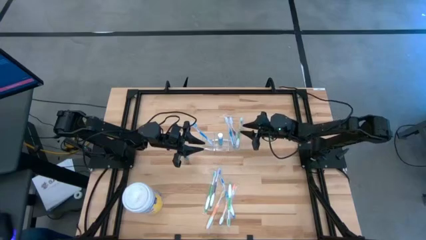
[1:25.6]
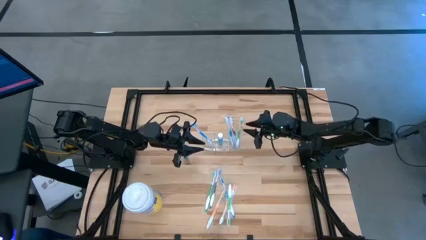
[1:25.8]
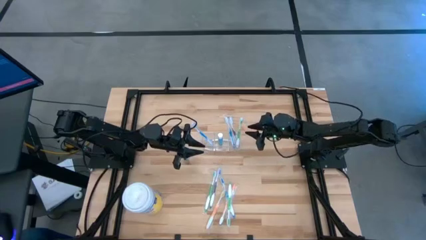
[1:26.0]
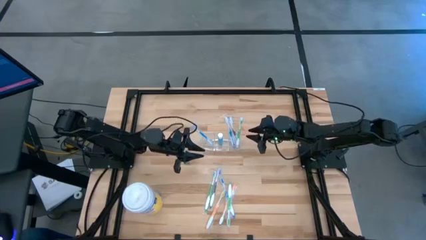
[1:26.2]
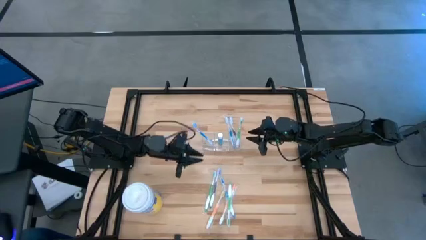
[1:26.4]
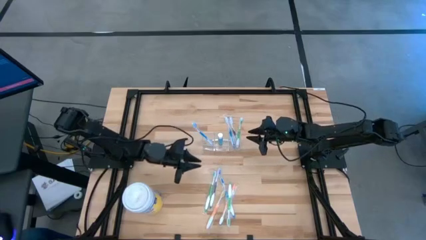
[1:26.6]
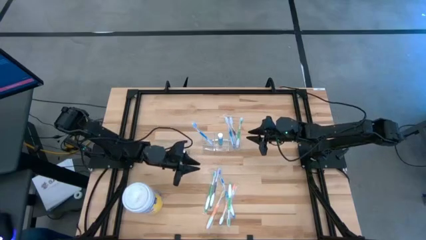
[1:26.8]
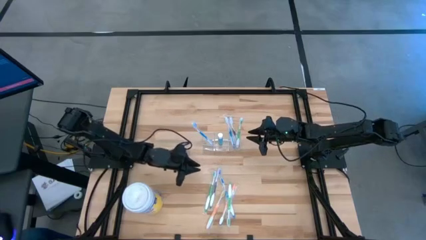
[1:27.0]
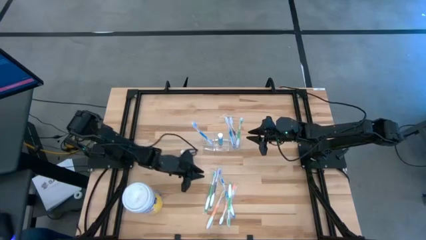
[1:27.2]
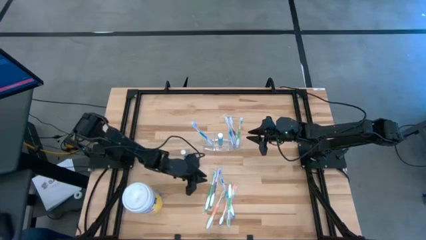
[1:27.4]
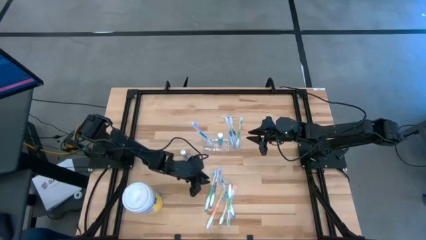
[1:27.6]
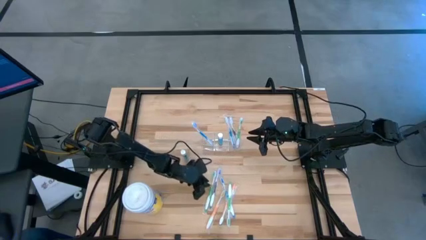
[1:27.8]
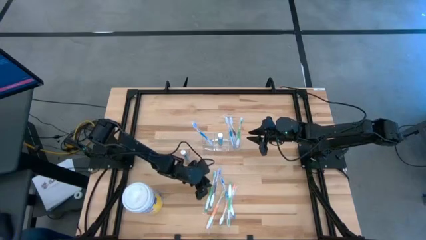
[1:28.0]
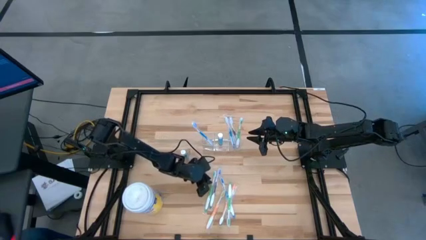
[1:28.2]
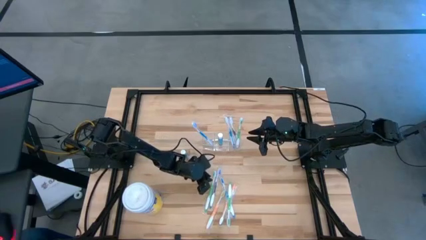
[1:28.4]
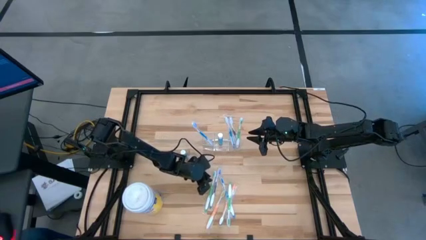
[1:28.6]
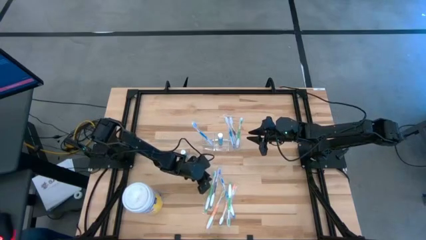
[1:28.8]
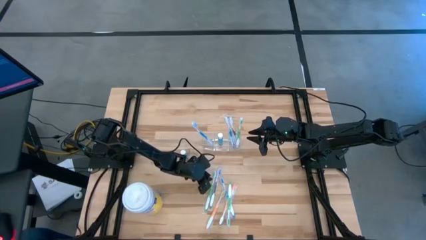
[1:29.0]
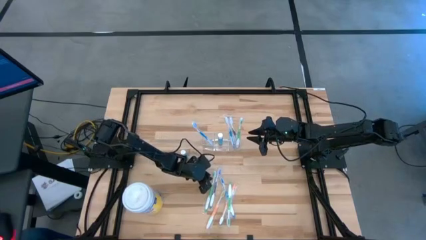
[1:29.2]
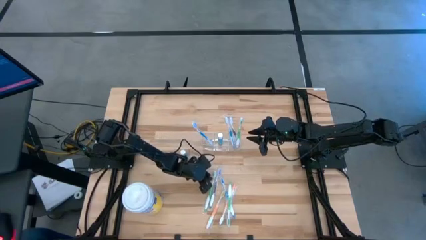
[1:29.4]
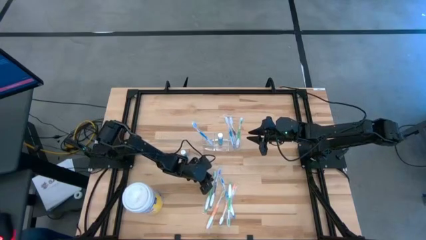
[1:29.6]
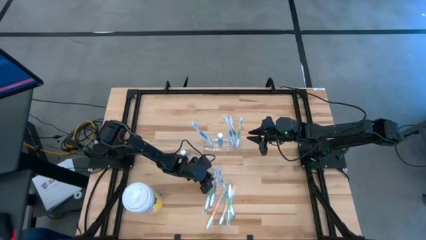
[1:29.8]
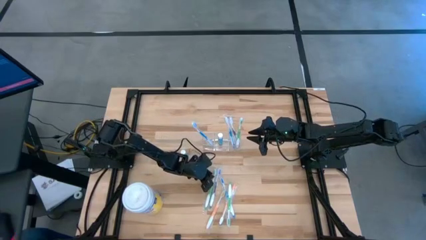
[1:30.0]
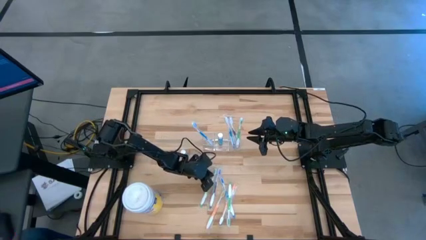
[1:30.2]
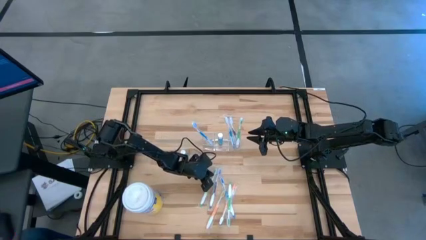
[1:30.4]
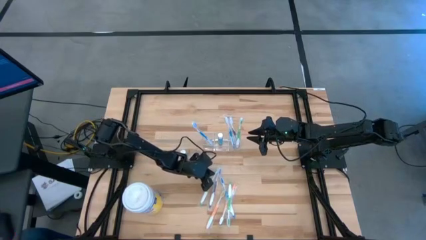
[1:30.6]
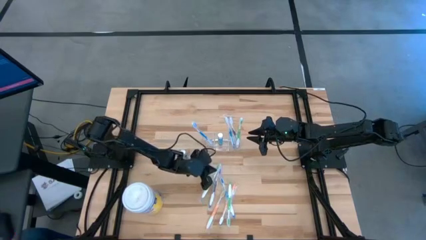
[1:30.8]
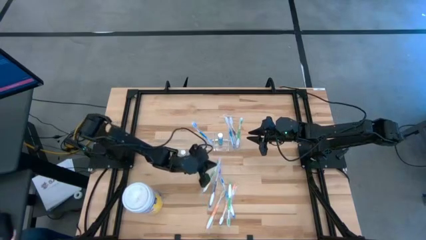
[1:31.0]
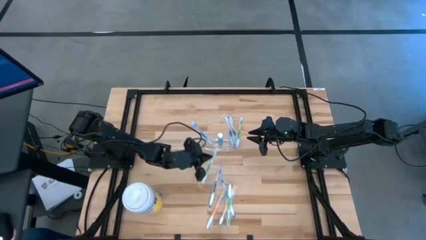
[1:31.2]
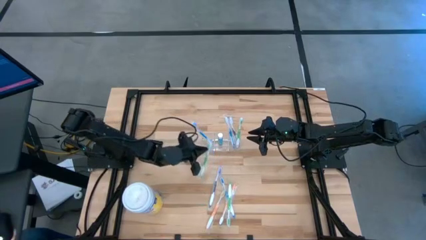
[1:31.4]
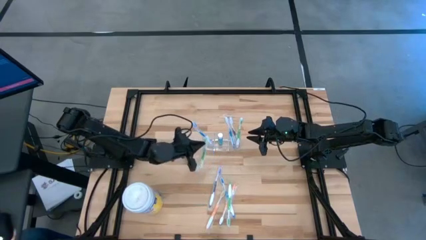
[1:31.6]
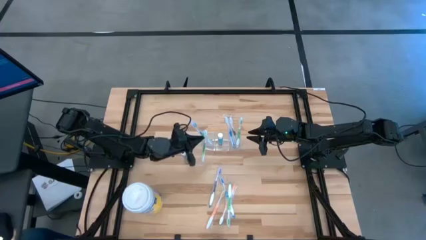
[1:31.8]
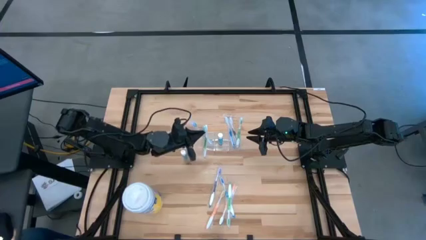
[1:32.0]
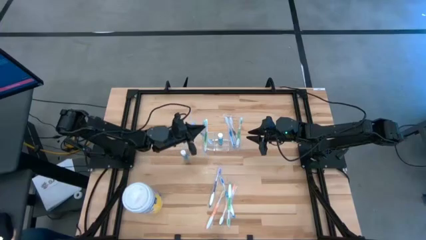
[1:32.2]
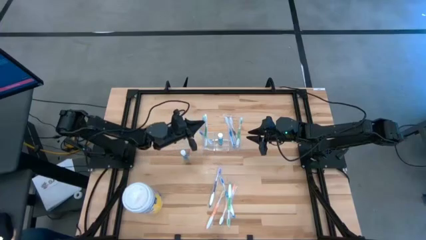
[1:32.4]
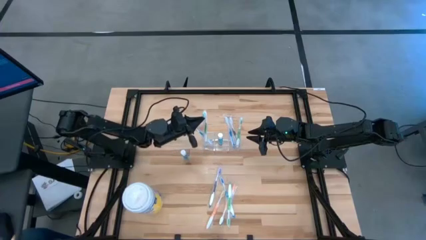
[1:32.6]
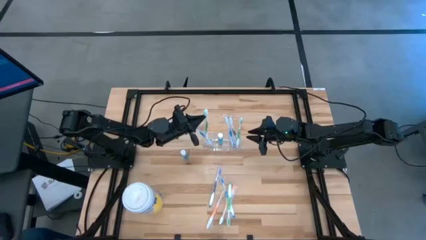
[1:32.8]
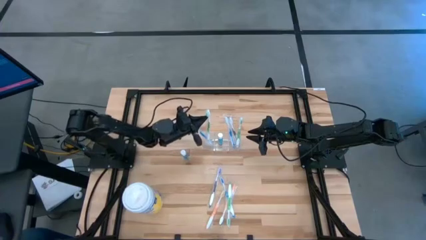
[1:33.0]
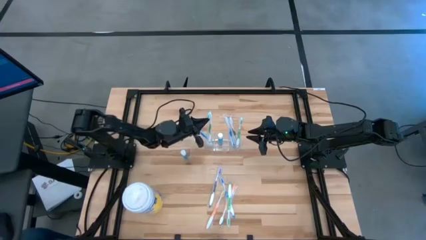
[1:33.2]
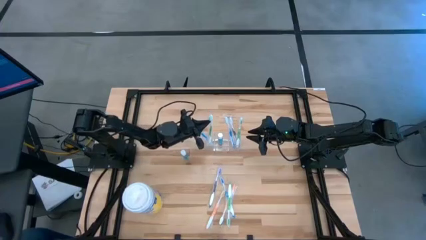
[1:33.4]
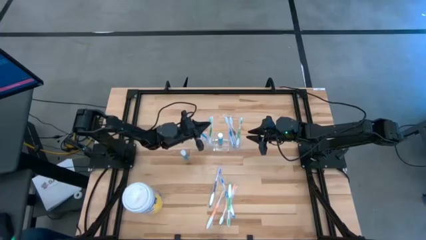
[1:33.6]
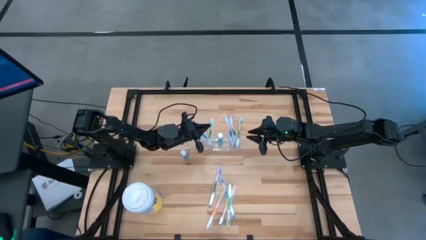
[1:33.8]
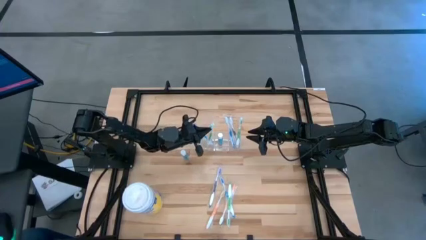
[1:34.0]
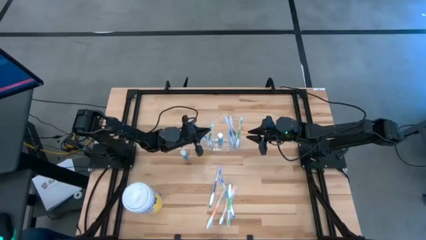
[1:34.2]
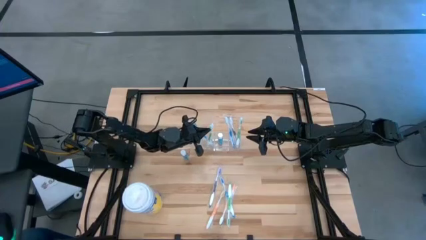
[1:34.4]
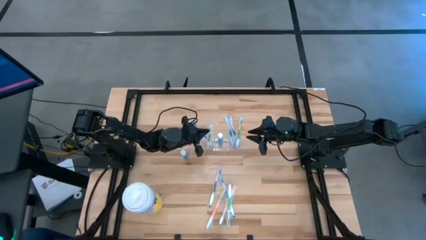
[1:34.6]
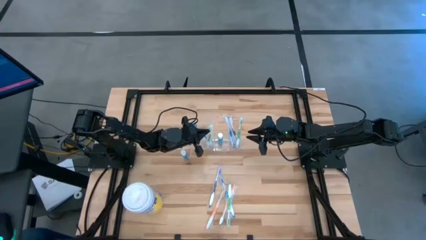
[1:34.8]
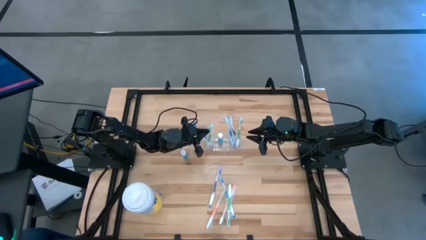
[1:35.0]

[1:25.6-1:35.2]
Task: Pick & Place toothbrushing station
Put the green toothbrush into the transparent organizer

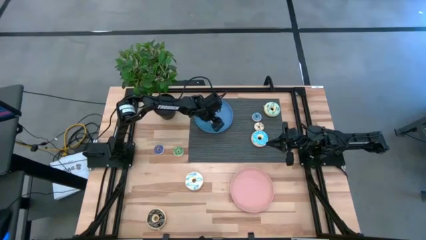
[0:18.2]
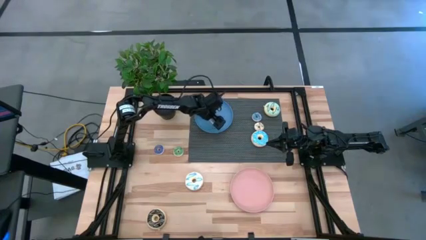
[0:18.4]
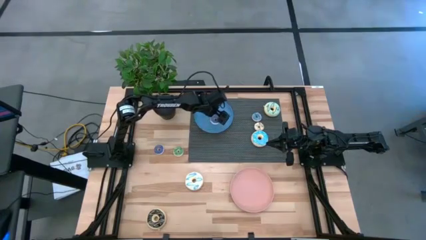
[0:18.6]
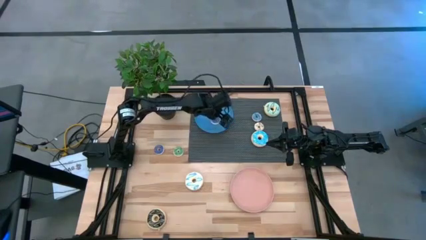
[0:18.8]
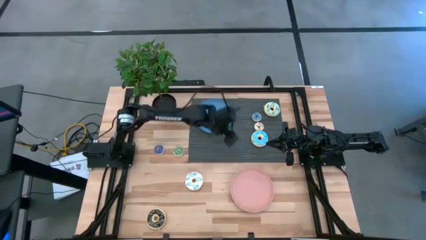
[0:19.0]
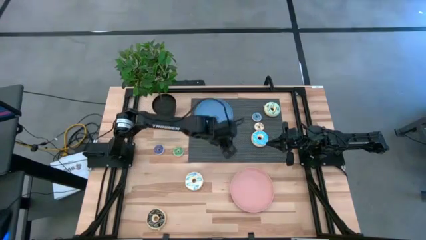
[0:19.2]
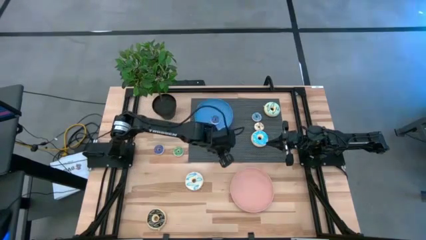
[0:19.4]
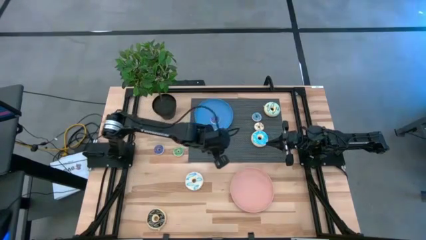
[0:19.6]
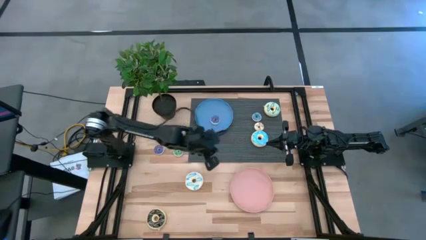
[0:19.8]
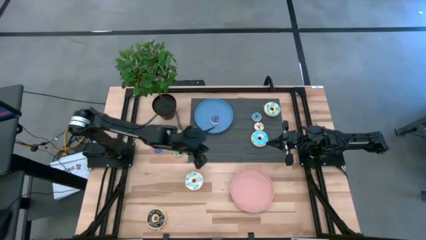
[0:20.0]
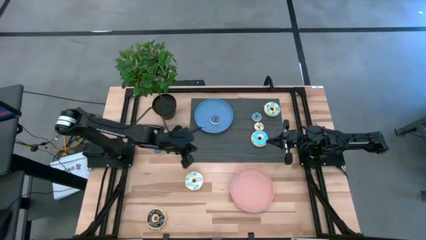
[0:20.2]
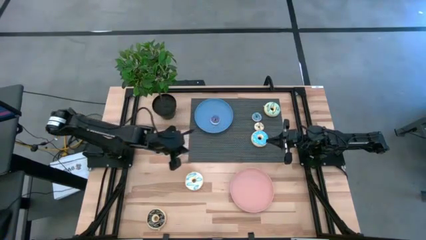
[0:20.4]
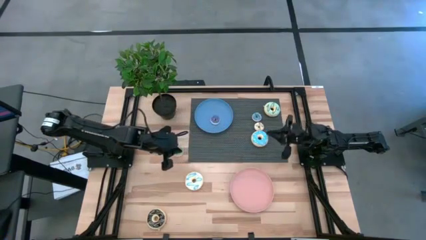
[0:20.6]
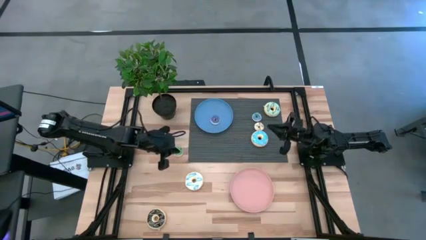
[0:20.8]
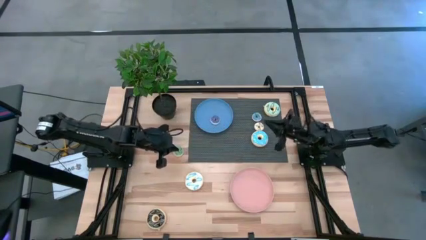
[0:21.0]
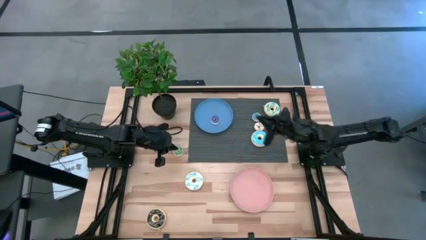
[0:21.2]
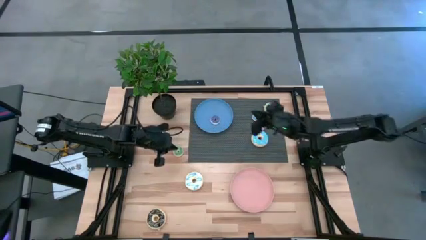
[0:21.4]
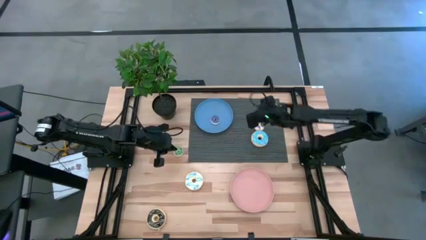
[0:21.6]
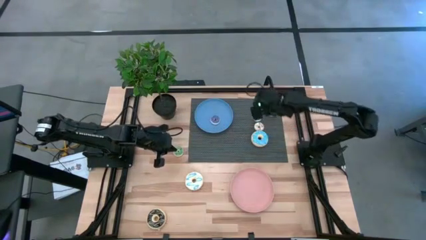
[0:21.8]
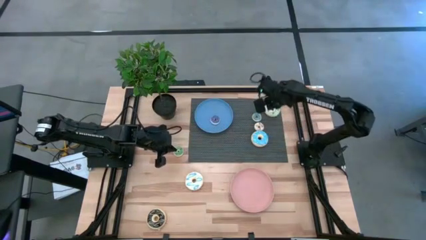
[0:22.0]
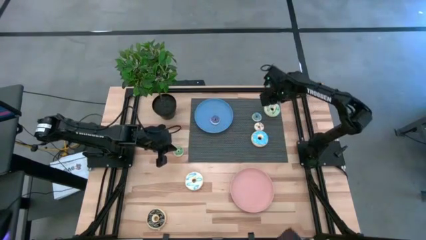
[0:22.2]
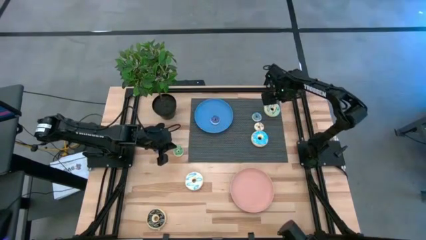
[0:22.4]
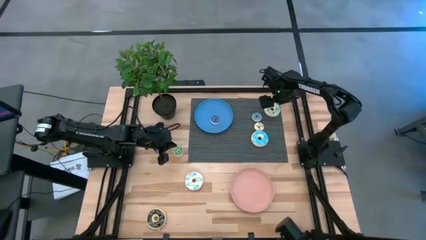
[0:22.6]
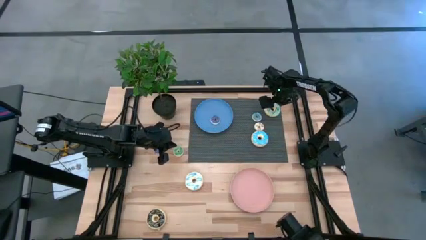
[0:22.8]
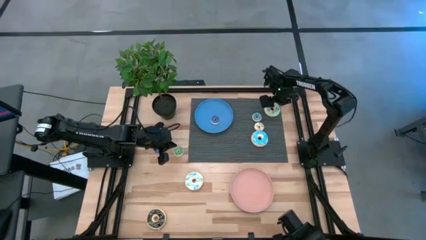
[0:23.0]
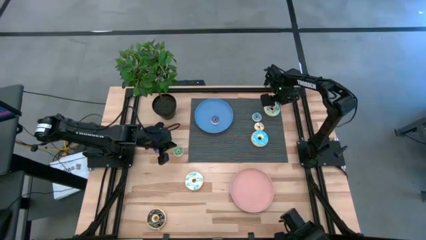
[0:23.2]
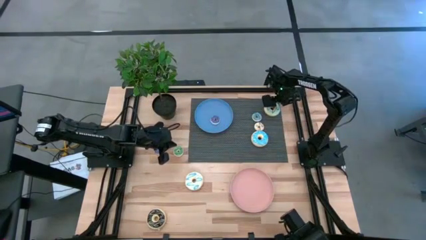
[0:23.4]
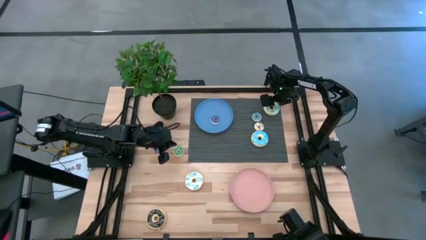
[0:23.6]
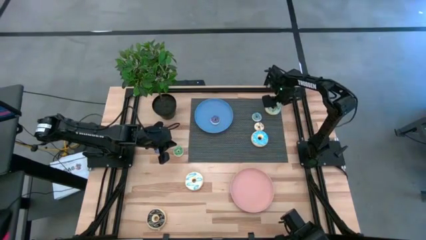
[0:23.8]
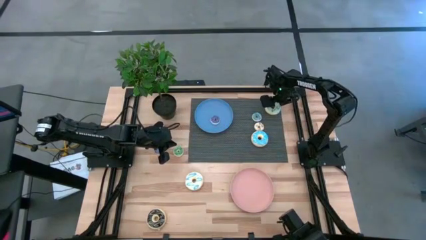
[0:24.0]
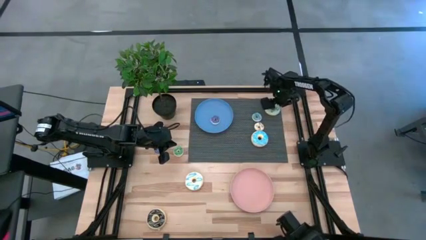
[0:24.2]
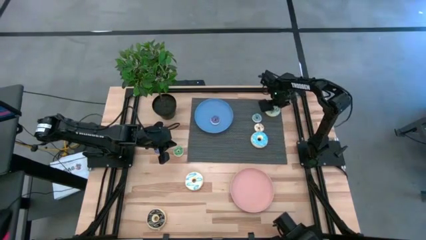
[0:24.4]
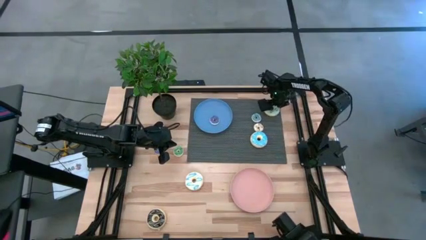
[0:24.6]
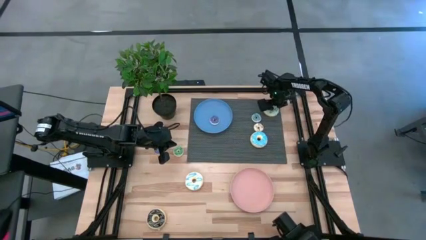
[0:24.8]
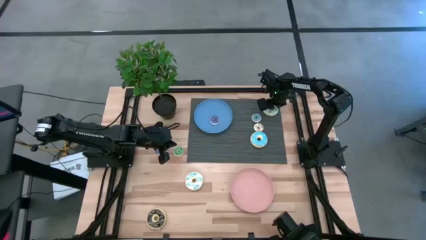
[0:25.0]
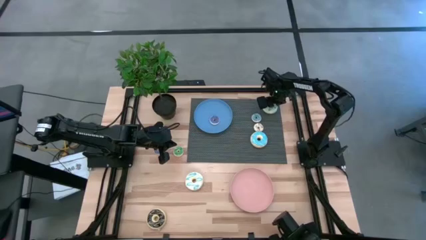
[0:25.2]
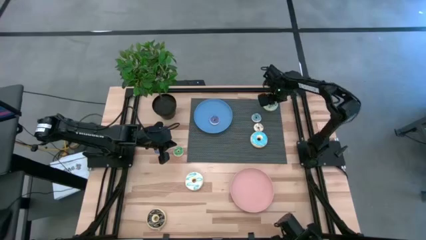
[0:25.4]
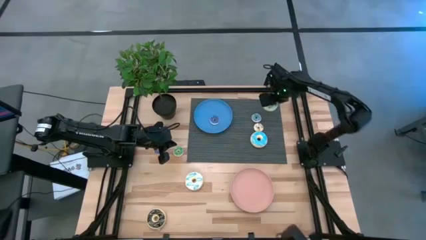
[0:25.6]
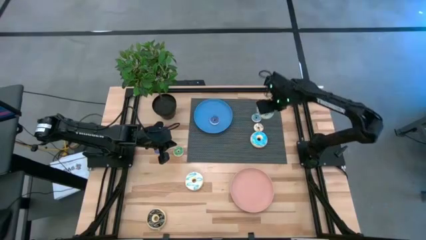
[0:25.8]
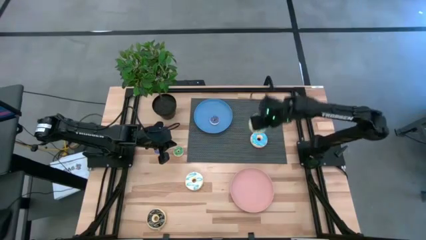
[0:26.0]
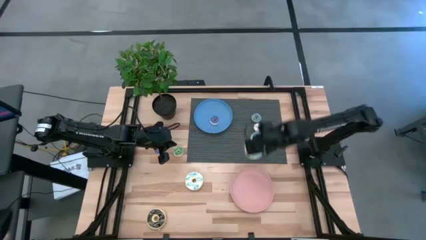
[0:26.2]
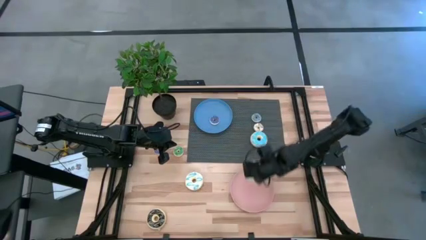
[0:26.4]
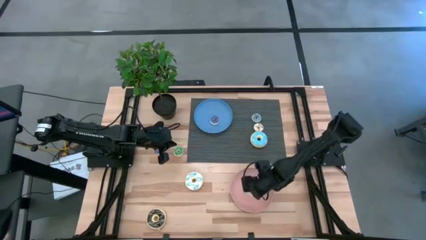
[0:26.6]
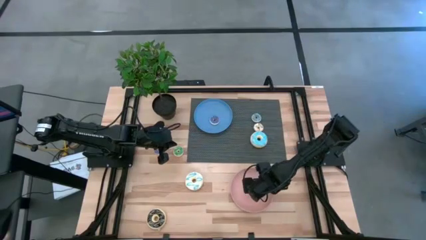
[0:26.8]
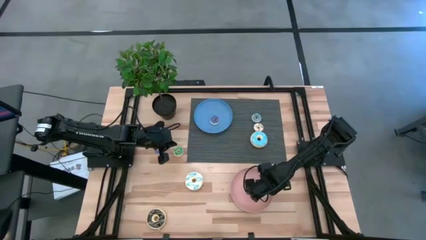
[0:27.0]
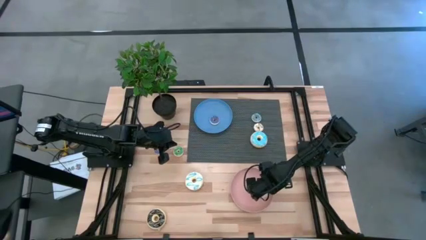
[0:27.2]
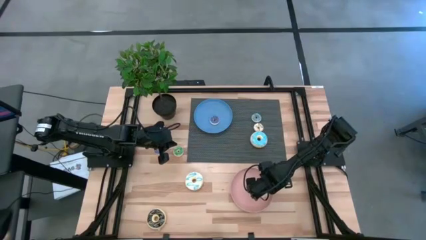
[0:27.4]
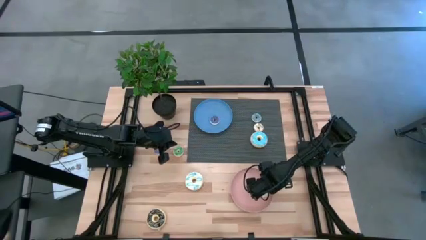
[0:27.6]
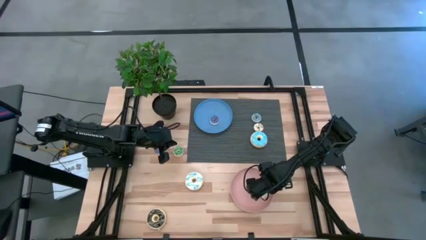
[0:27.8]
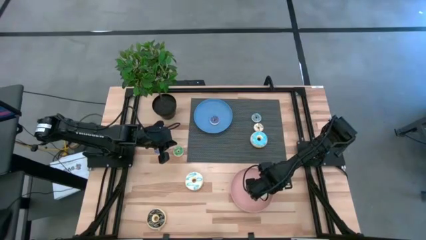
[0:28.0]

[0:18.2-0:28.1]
Task: Pick & Place donuts
Put the big cyan donut into the pink plate
